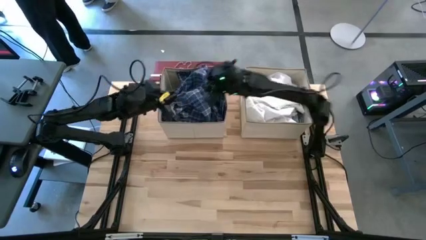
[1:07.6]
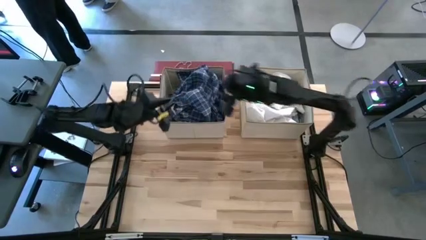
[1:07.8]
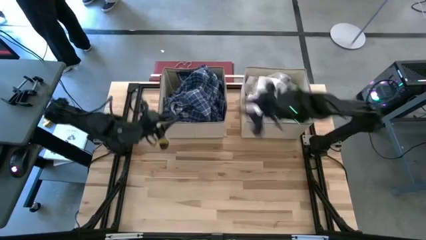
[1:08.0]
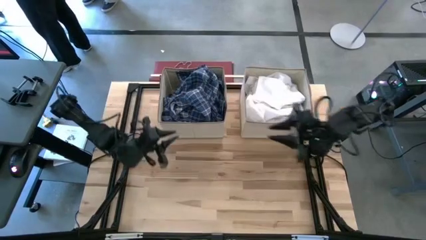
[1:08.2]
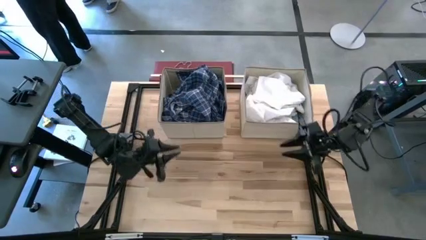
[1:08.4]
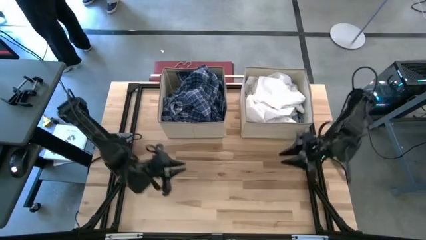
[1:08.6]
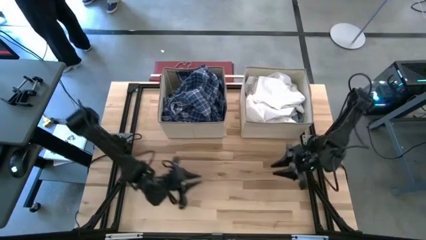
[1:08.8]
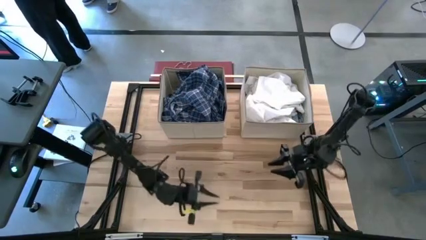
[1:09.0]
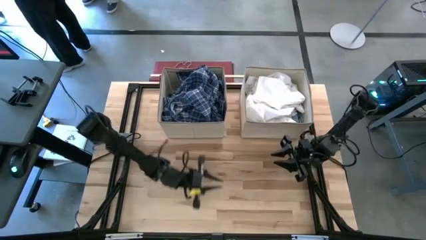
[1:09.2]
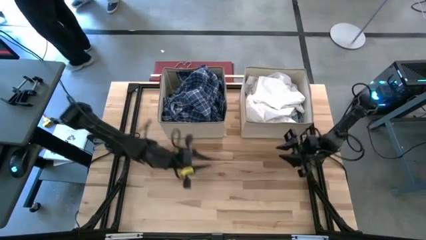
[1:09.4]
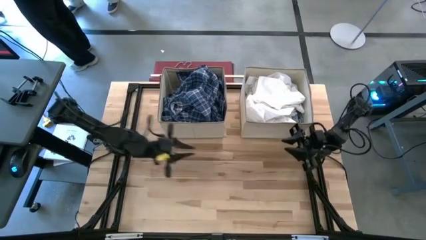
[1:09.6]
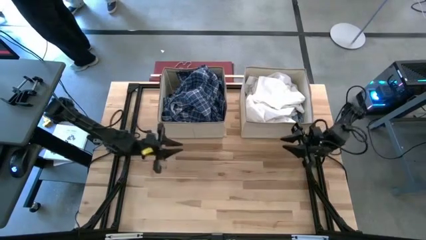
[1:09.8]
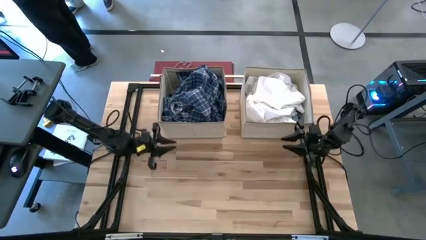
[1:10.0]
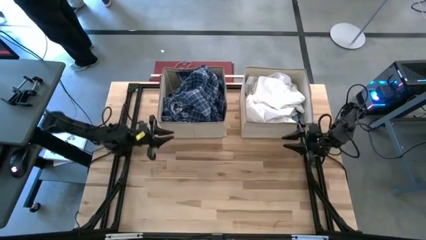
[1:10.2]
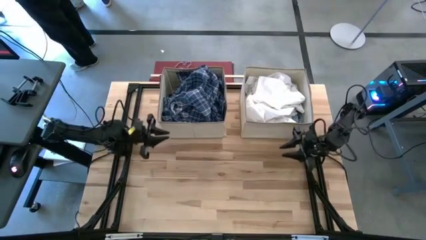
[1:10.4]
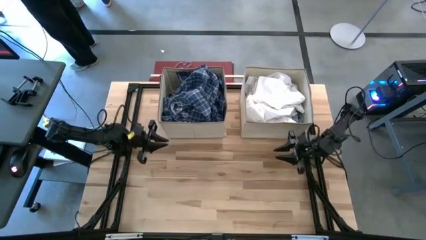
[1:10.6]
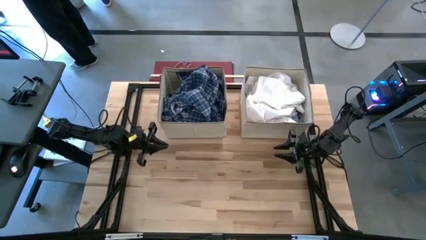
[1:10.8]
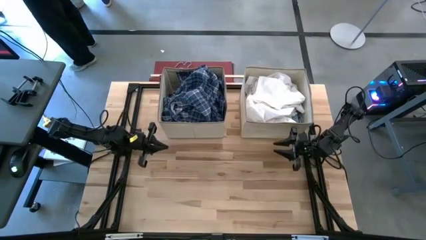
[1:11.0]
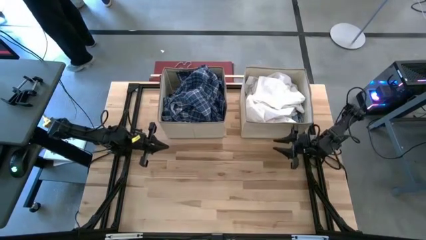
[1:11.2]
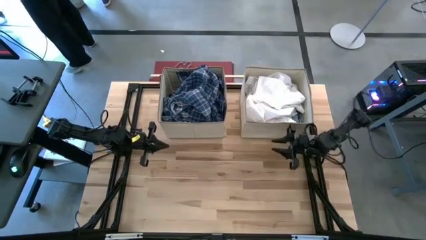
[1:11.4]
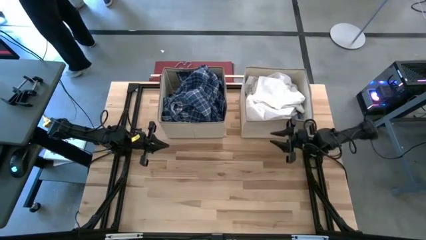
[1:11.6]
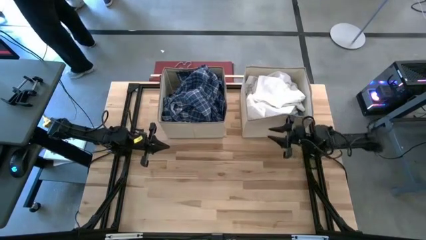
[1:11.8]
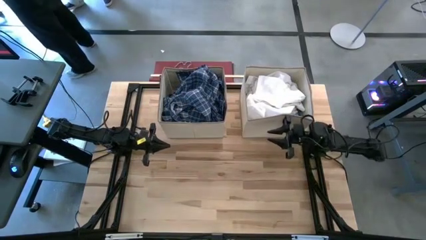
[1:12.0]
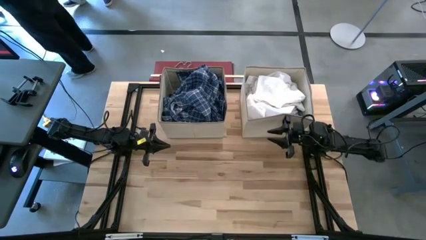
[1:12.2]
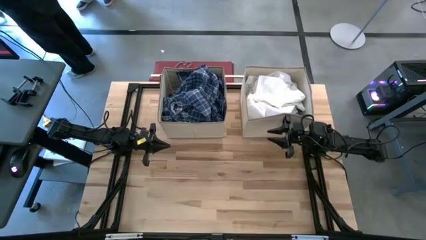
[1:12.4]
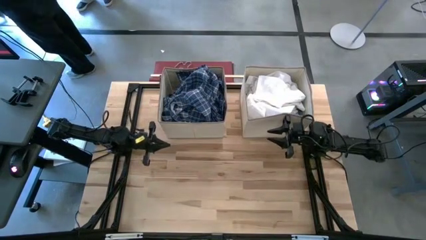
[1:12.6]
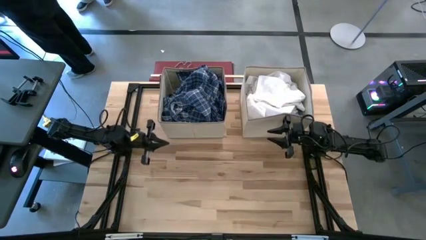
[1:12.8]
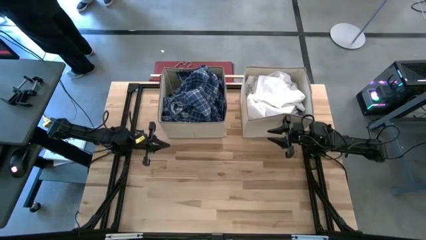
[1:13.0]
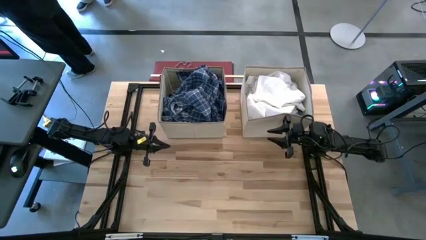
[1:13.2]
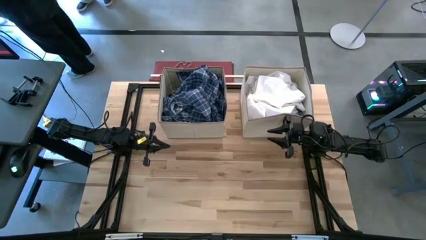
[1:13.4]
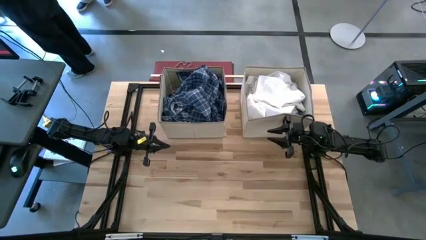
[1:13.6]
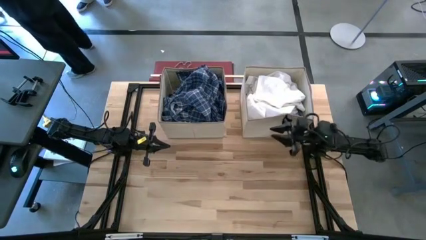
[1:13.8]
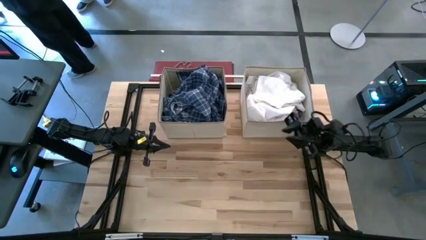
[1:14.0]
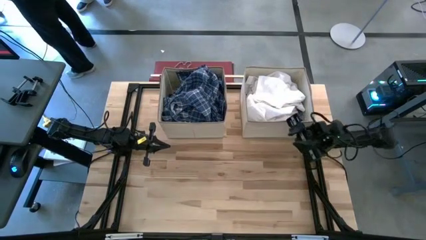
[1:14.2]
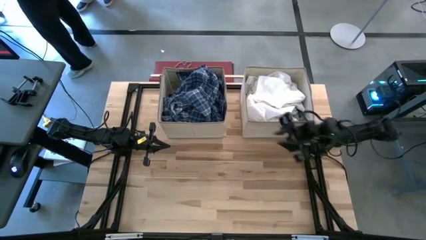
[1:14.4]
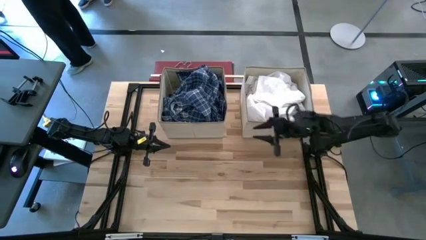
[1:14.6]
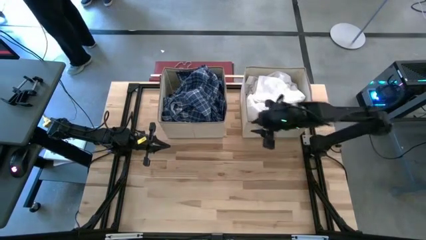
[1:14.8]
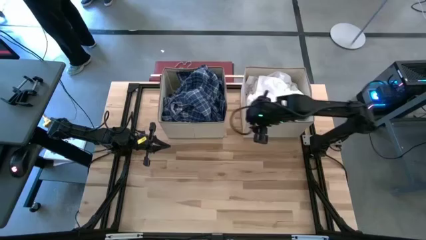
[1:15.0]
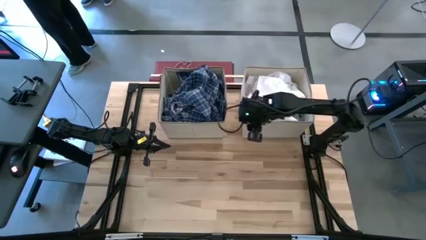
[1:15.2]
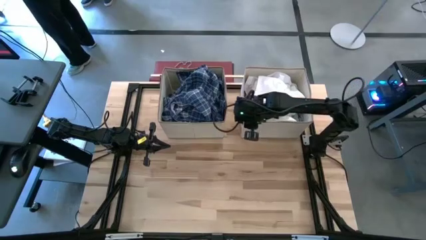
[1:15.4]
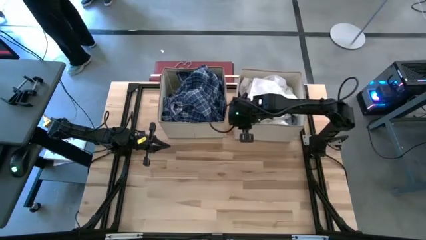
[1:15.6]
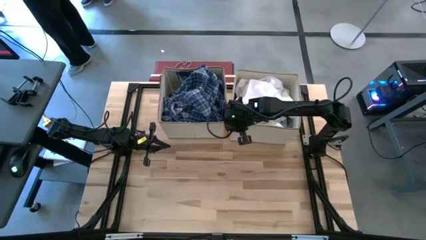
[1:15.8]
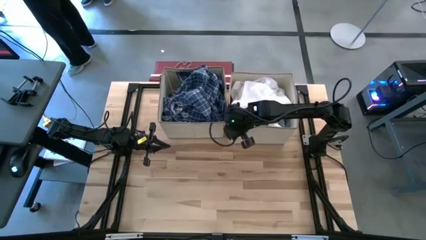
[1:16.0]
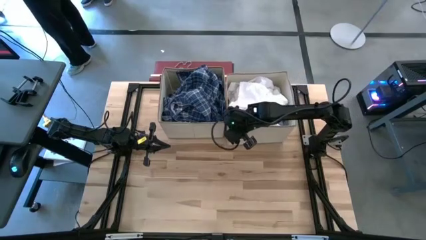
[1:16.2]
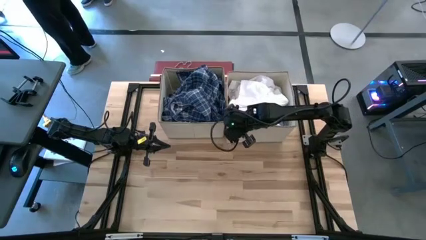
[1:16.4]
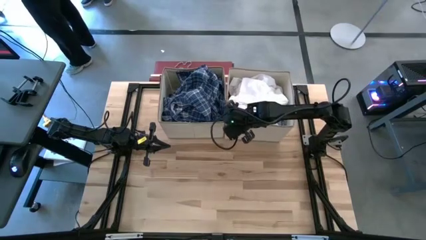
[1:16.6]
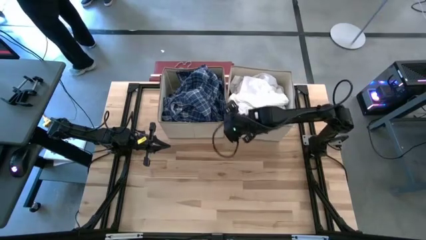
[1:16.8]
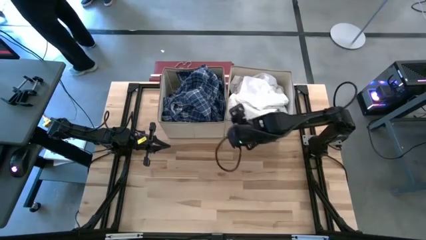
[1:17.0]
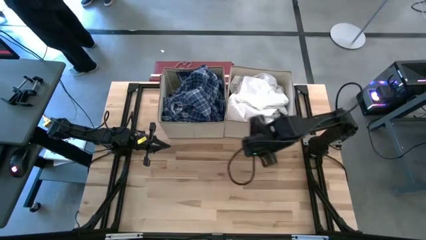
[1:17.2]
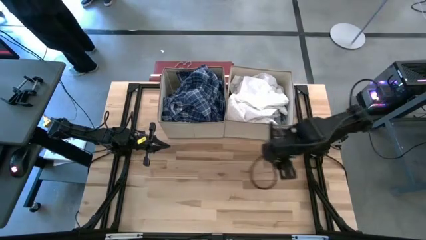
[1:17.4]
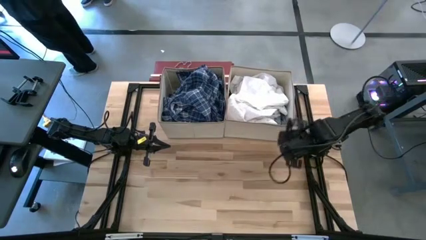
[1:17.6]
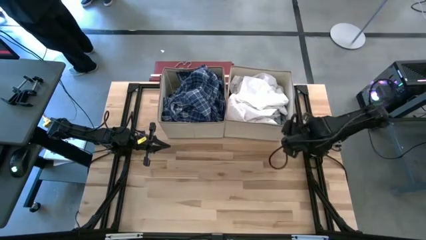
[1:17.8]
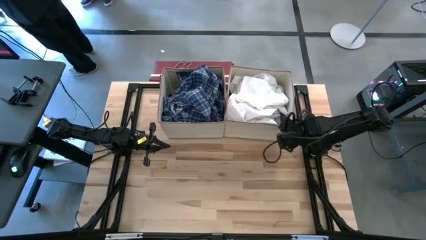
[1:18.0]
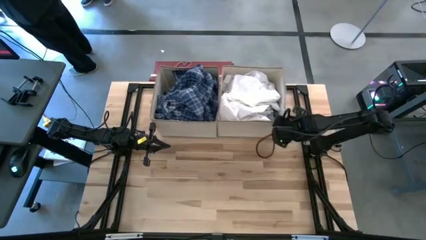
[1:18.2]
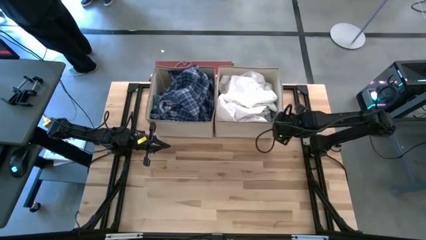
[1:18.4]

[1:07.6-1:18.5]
Task: Sort clothes
Adjust the right brown bin

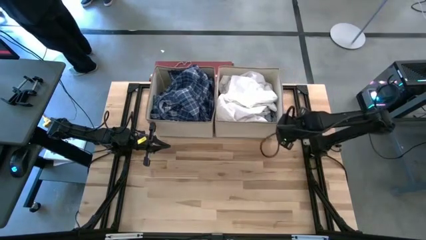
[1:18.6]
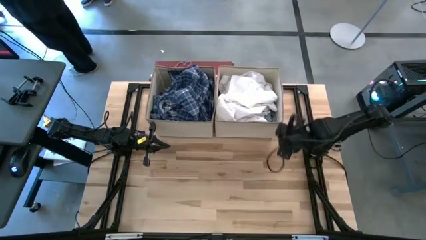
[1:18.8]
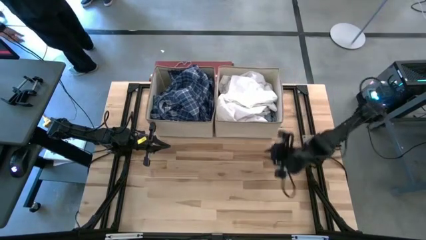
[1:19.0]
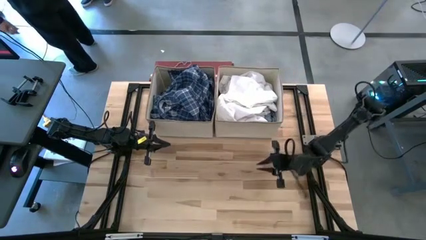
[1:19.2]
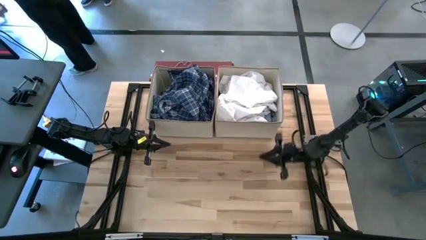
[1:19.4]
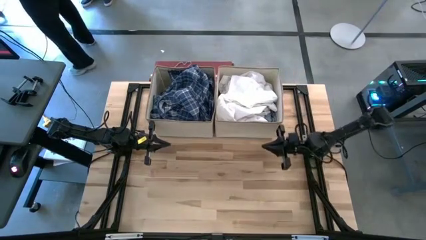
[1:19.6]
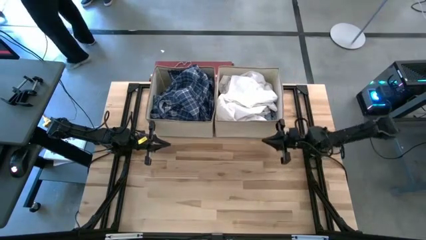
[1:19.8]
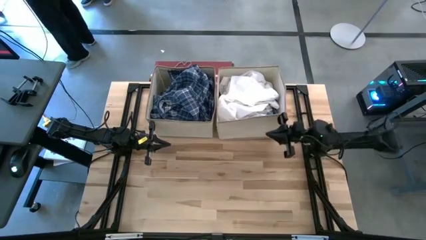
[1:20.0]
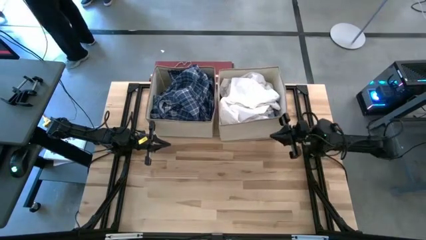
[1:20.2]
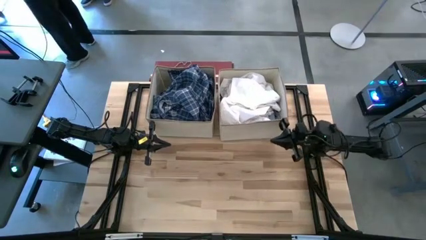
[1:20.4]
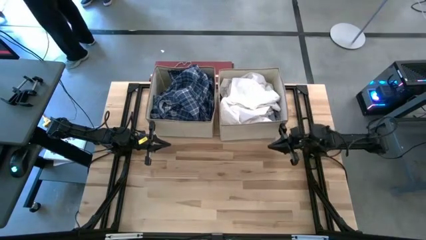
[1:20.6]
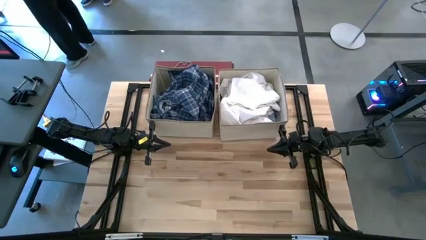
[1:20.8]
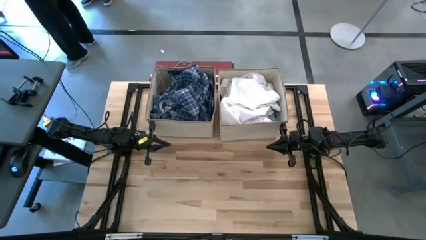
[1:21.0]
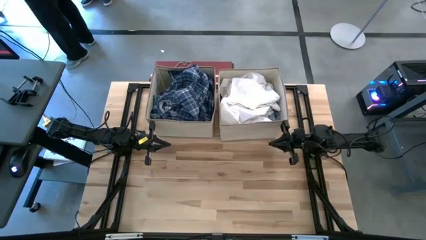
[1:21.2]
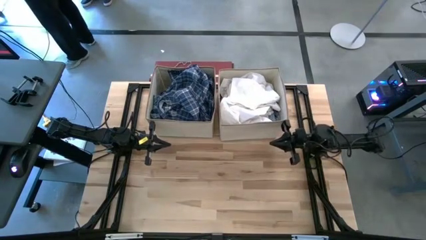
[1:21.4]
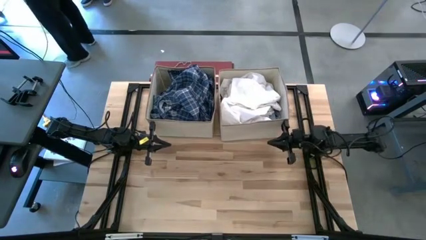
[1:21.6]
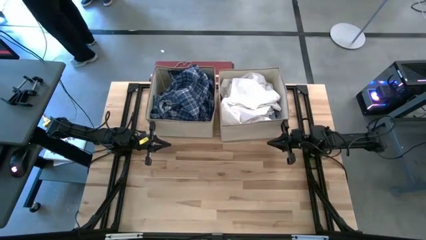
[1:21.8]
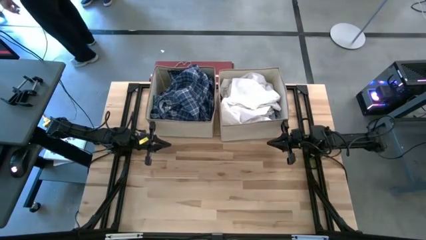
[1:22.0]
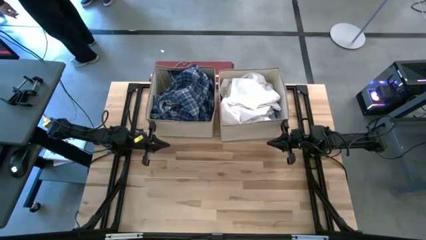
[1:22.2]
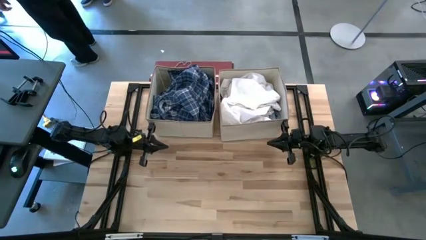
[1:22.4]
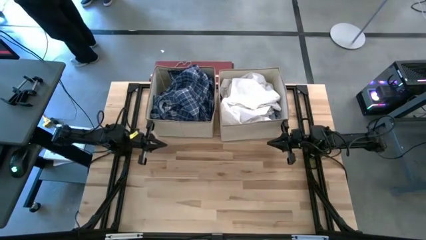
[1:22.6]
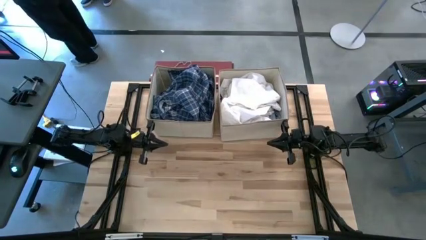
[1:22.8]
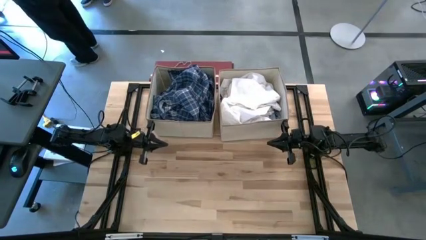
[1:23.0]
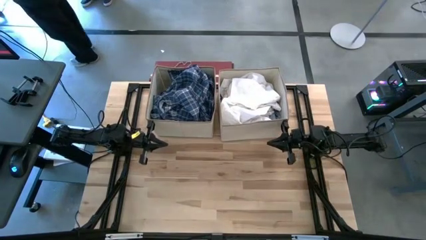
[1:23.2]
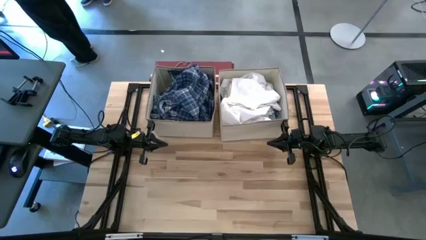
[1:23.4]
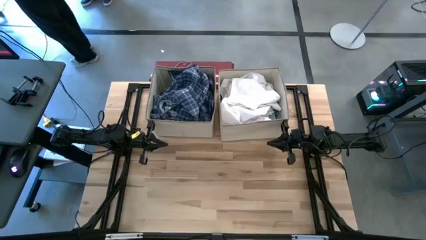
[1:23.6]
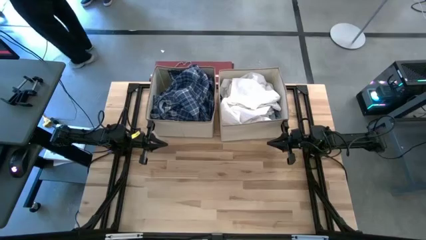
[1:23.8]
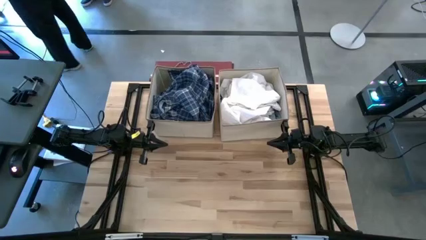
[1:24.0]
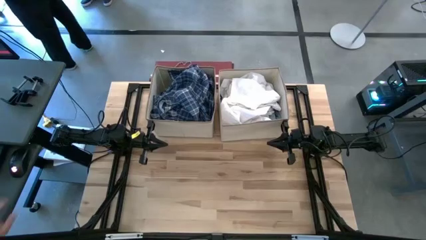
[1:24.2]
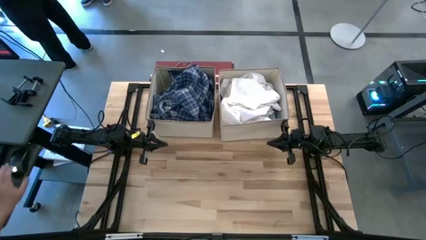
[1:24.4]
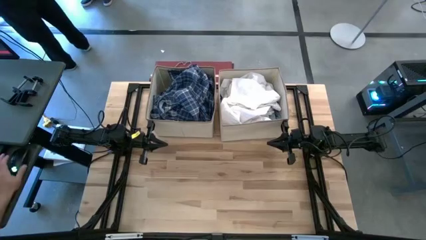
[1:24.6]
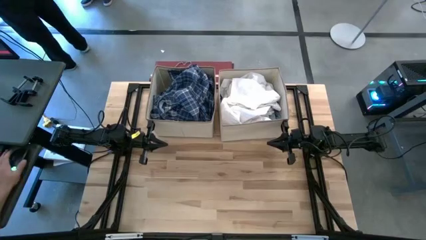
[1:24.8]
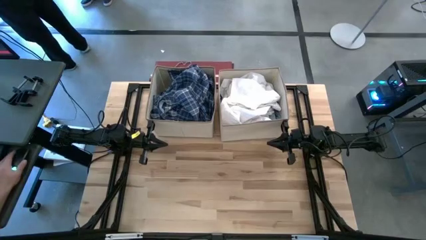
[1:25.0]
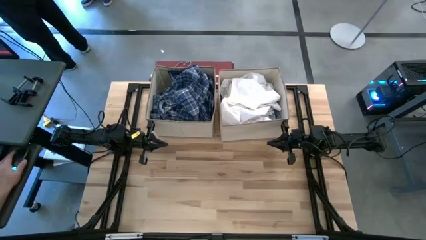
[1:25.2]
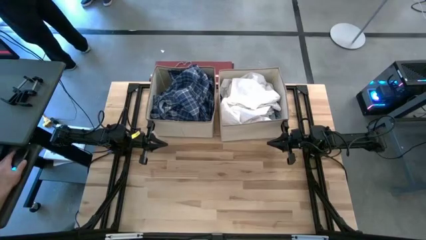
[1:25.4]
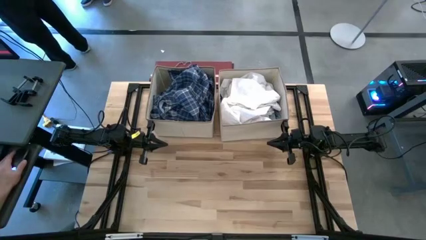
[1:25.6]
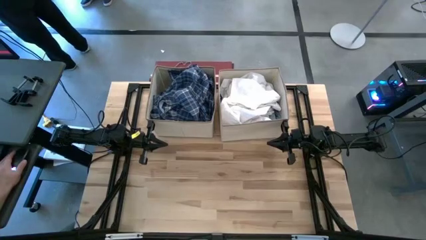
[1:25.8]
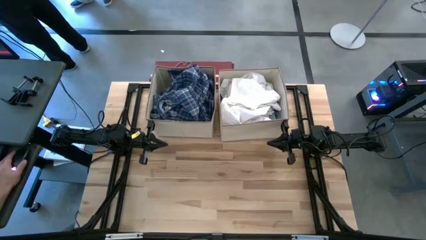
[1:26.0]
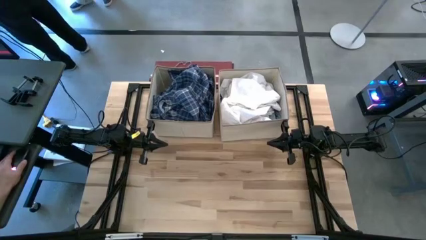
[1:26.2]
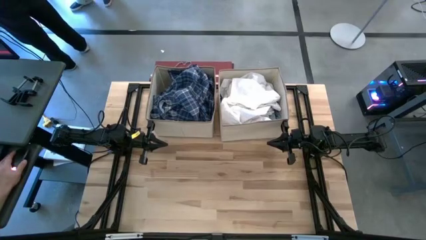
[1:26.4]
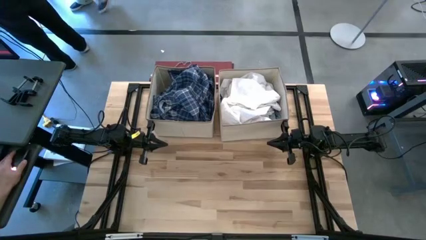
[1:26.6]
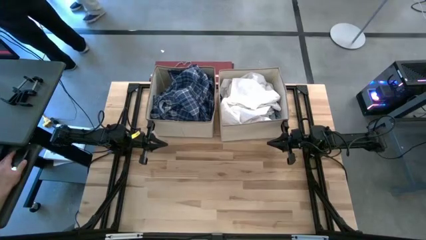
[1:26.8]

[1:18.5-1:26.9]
Return to Home Position
